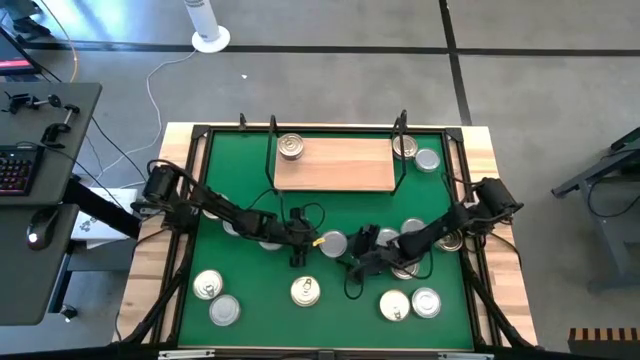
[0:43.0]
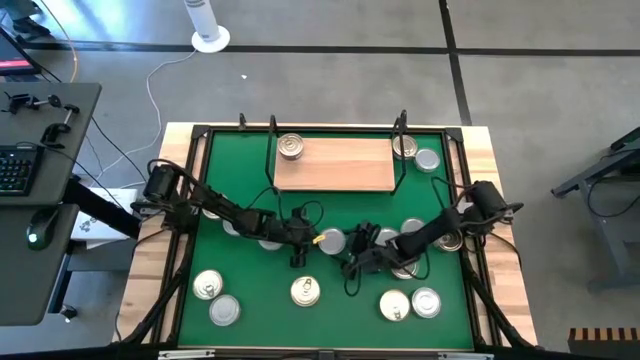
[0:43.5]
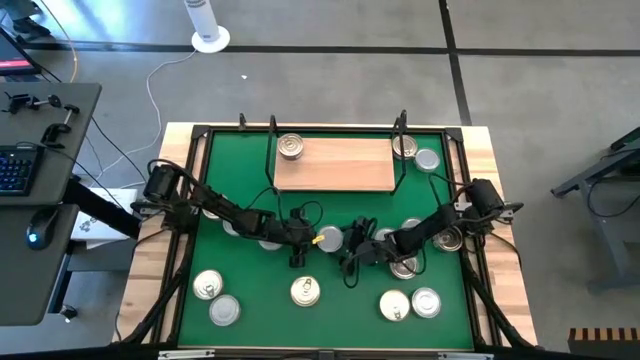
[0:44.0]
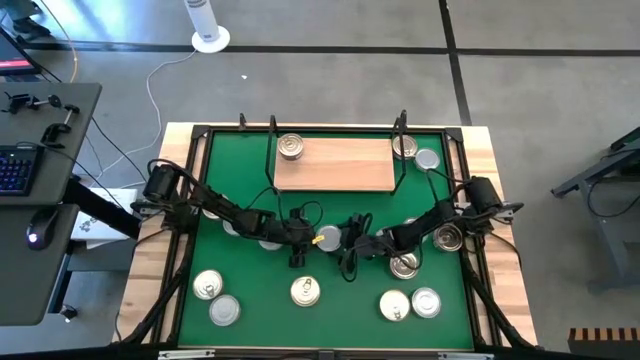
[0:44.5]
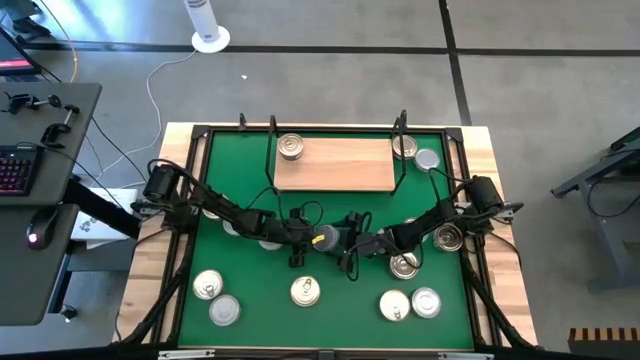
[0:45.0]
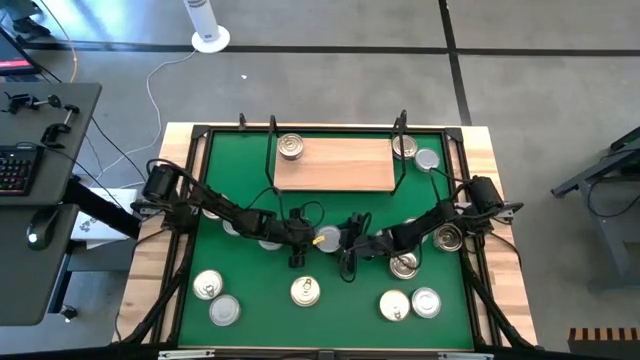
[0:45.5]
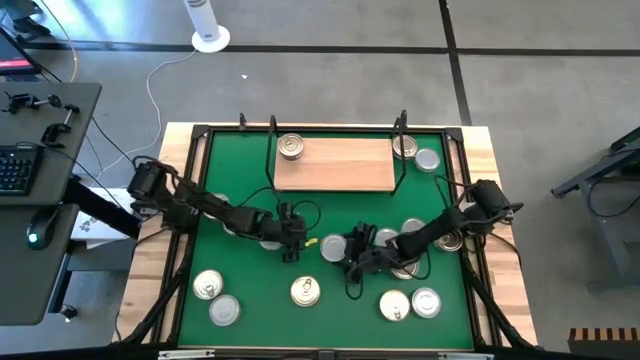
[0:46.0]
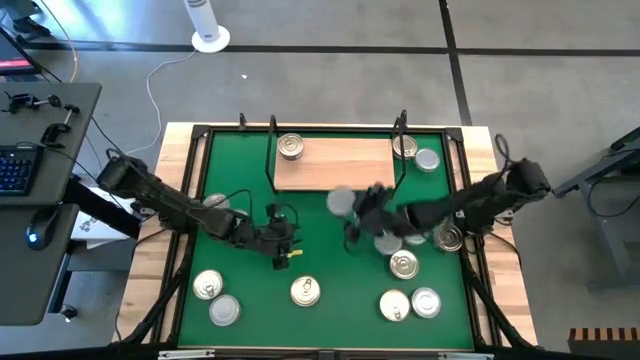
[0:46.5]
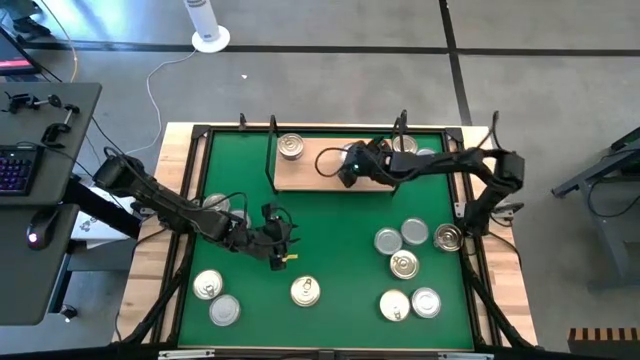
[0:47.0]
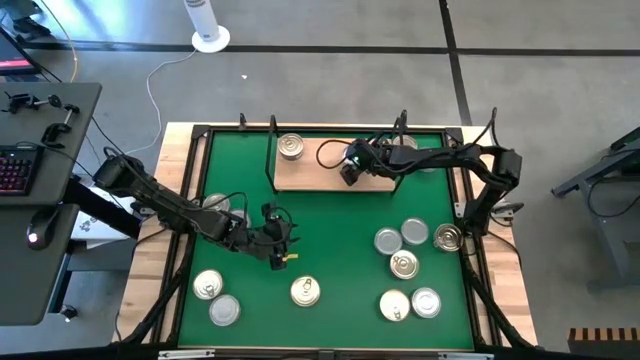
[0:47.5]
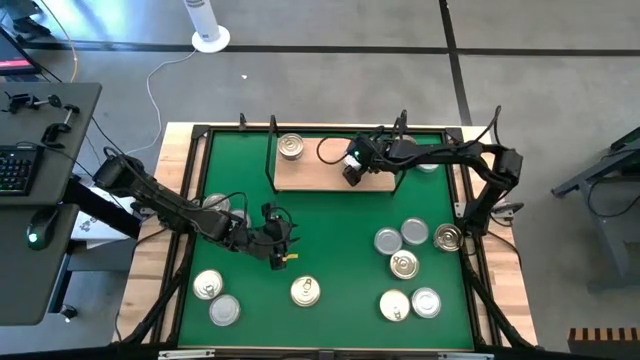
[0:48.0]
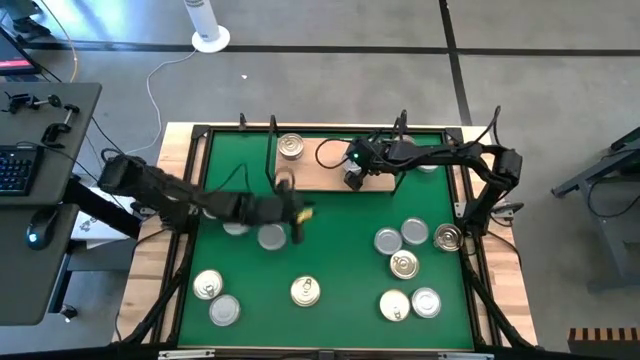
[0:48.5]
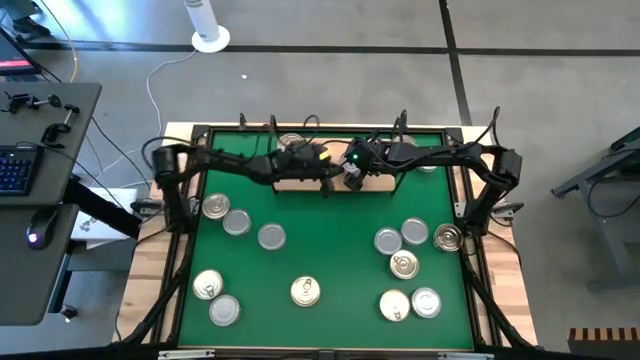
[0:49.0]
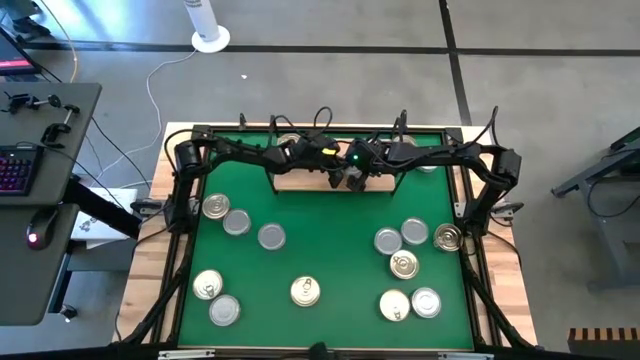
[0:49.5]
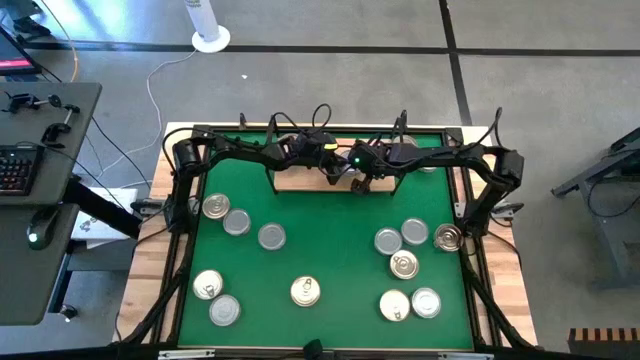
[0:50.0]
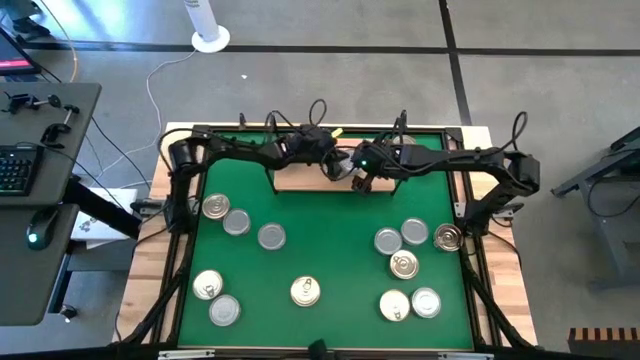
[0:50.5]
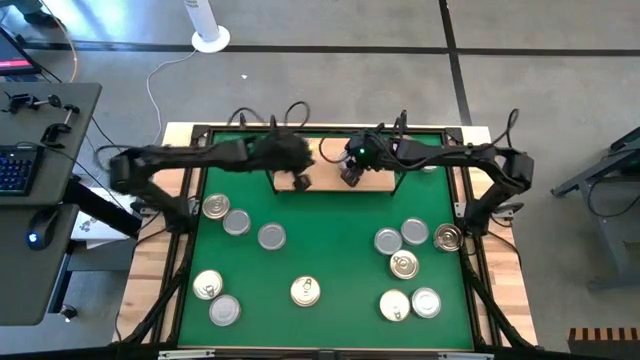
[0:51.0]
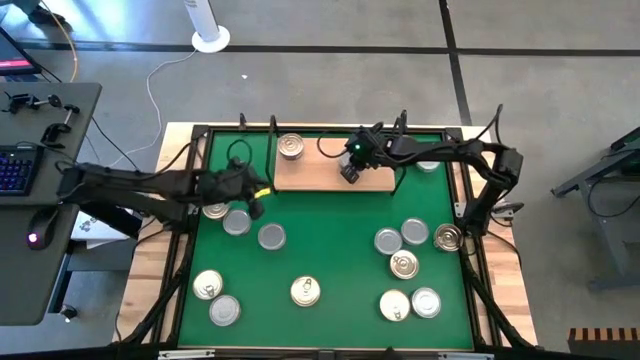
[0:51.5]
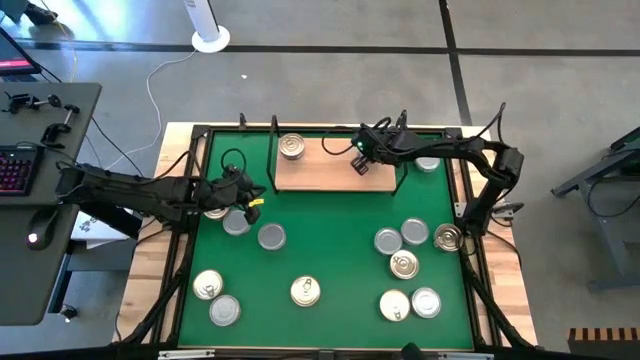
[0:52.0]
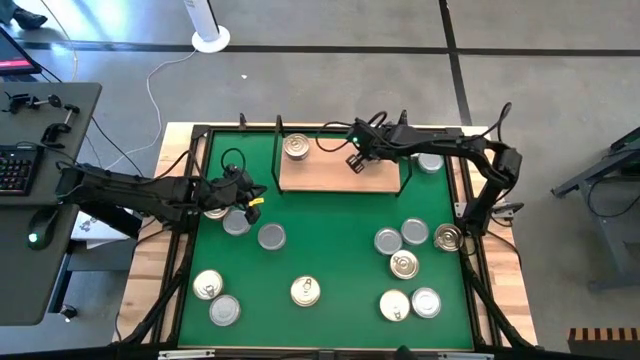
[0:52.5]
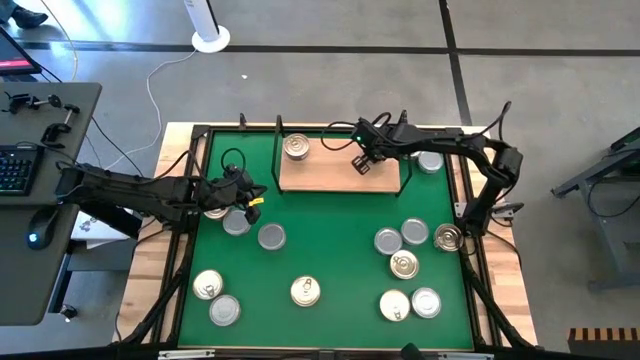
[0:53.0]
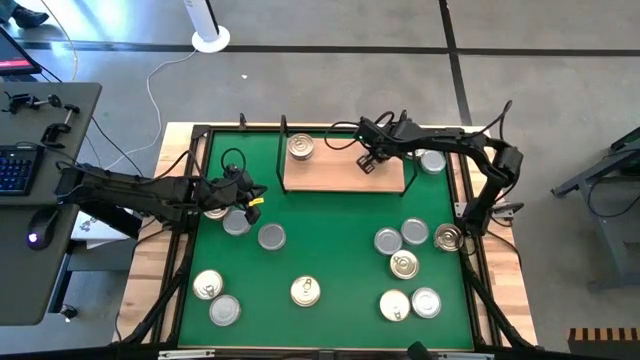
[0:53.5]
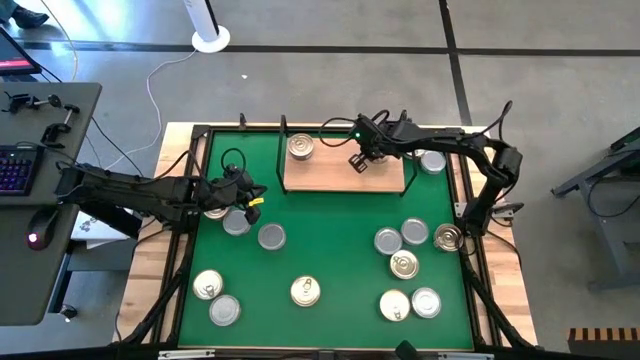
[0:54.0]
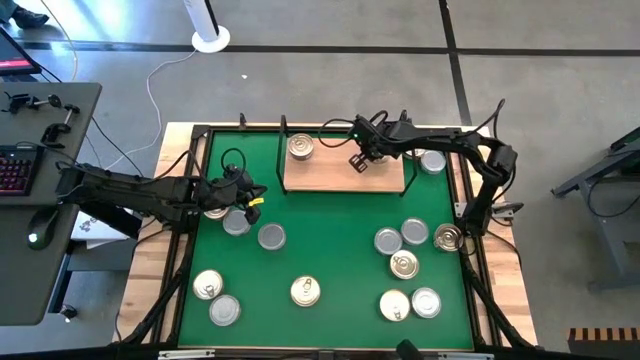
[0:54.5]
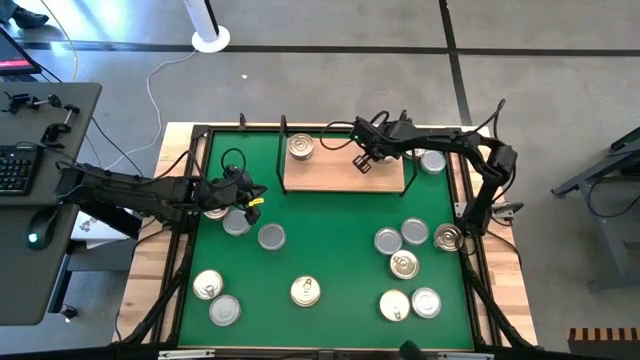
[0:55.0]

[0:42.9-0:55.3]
Task: Stack canned seafood by type on shelf
Put the green tuna can on the shelf

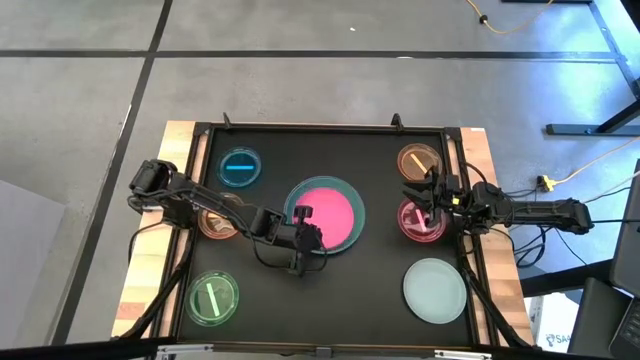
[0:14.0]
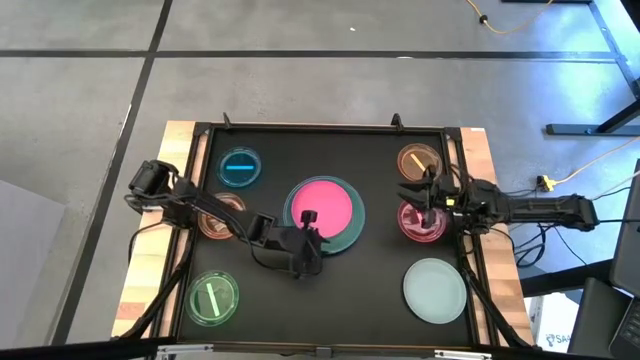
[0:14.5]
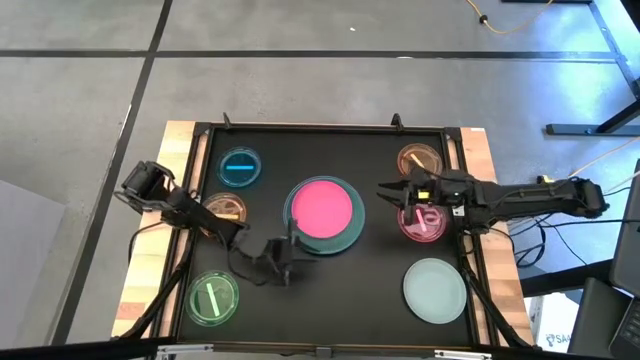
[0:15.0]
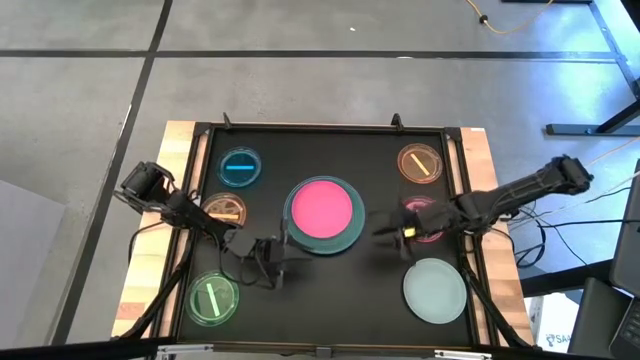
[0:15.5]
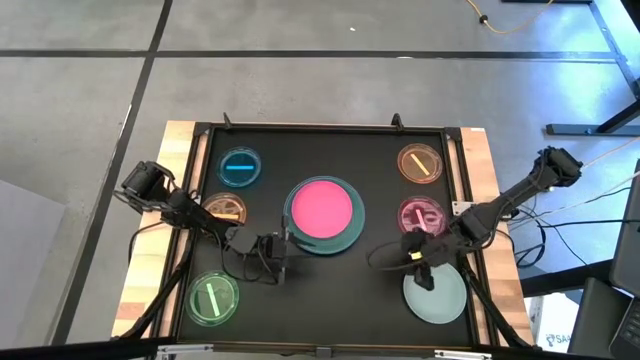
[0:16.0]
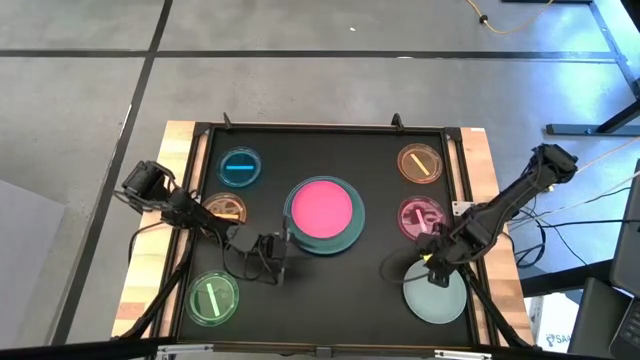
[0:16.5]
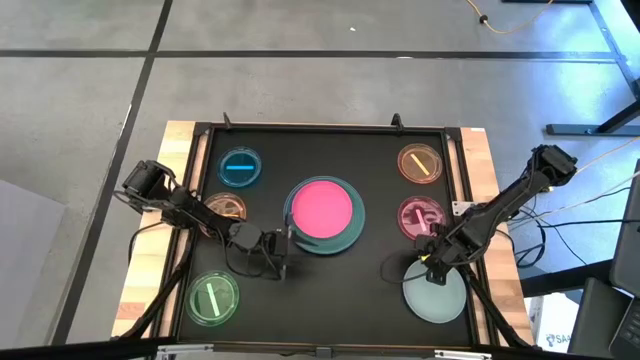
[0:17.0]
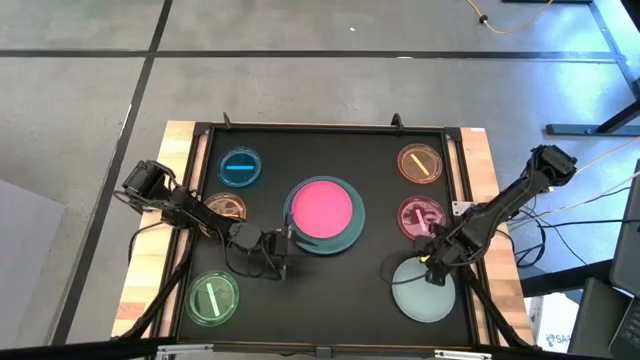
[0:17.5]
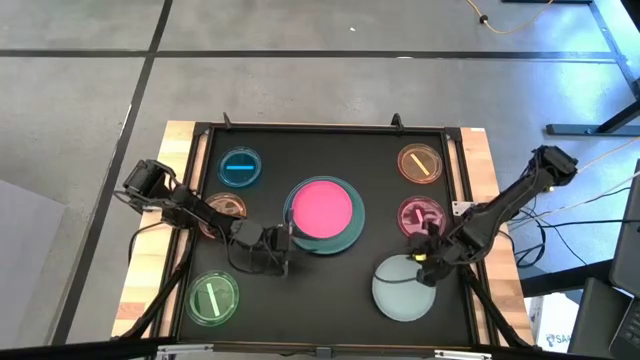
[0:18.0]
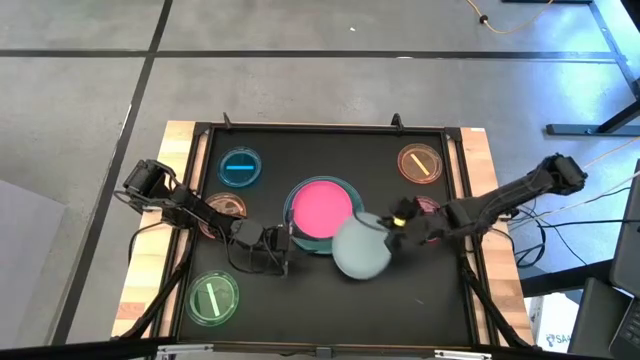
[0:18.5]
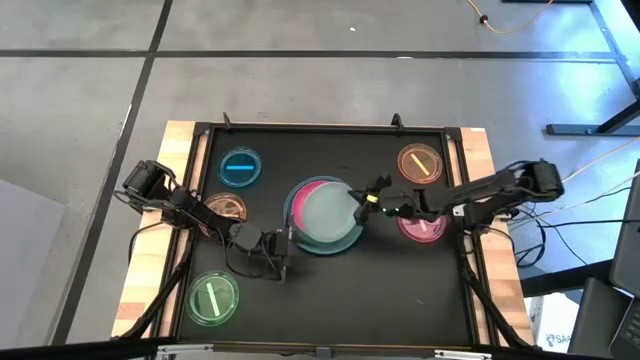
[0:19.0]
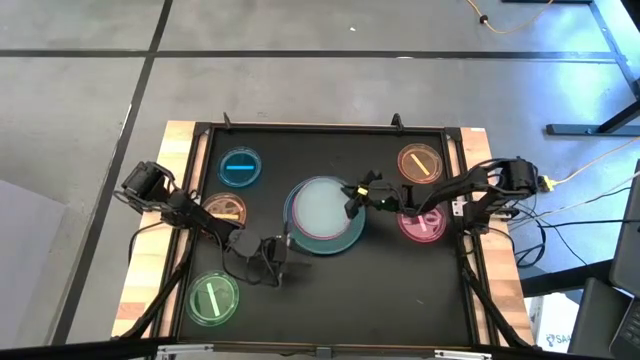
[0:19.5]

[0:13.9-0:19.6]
Task: Stack plastic plates
Stack the gray plate on top of stacked plates

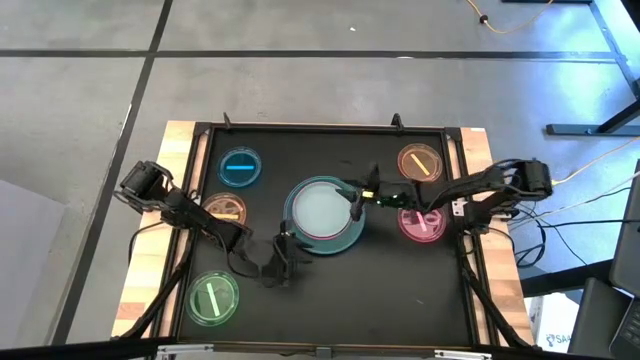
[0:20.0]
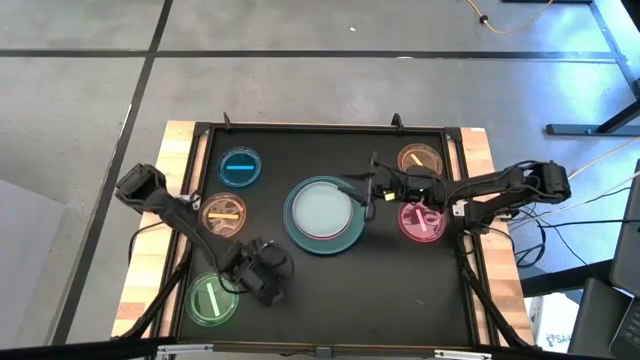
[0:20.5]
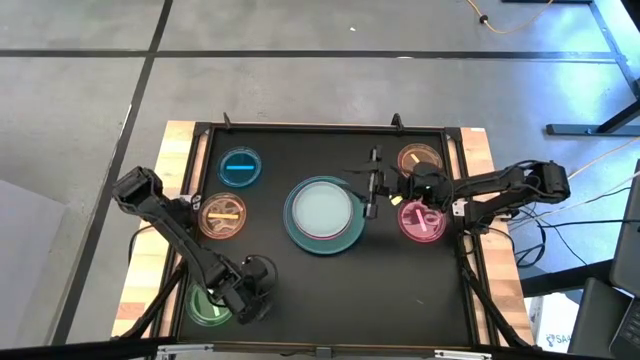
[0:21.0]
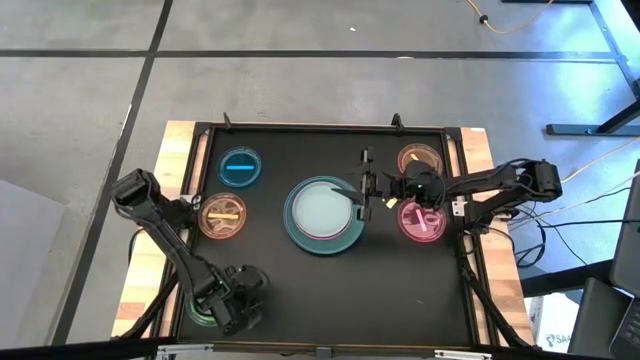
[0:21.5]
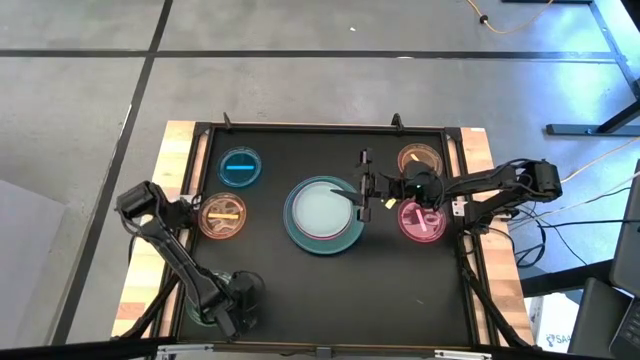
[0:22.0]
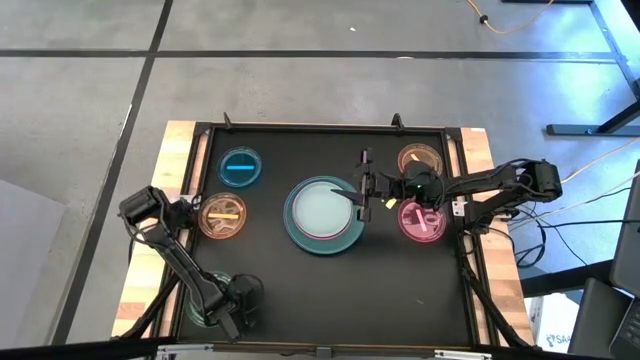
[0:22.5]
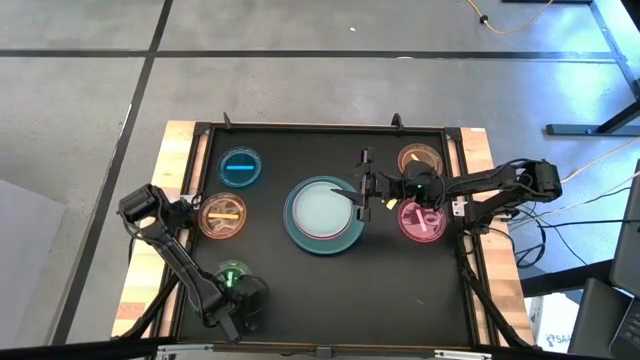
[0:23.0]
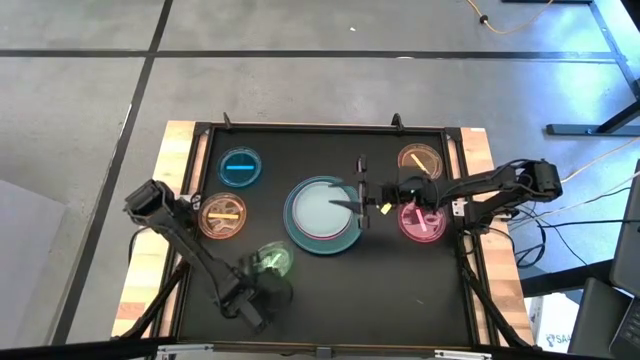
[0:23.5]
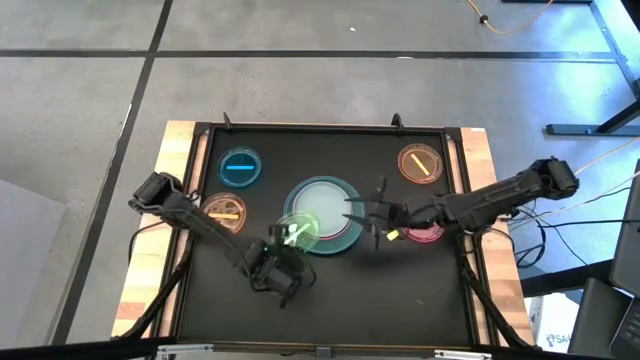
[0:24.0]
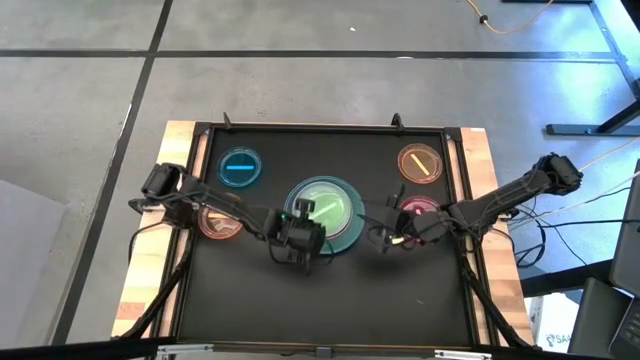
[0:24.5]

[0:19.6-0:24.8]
Stack the transparent green plate on top of the grey plate
